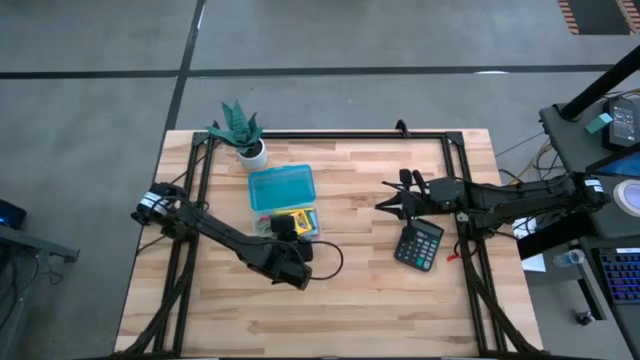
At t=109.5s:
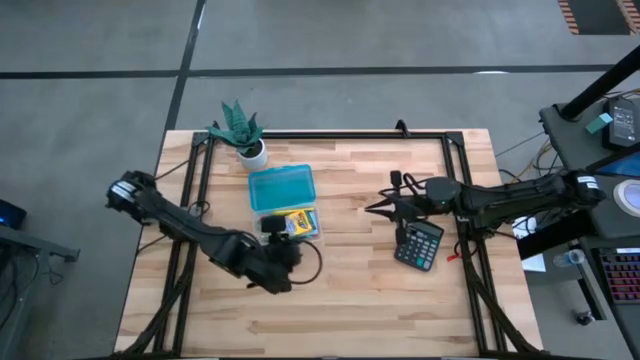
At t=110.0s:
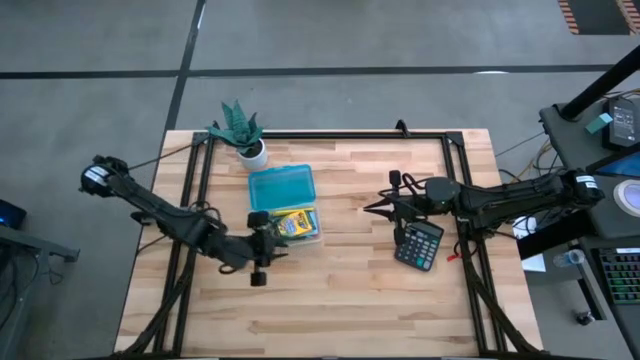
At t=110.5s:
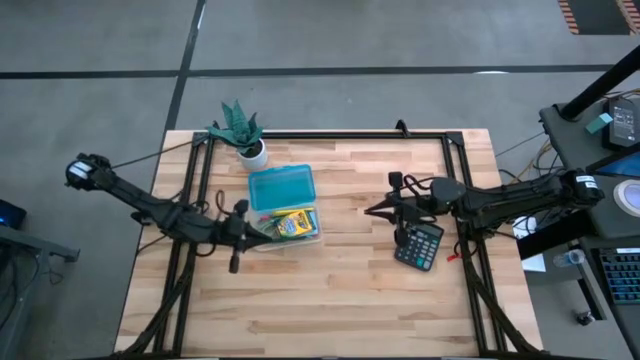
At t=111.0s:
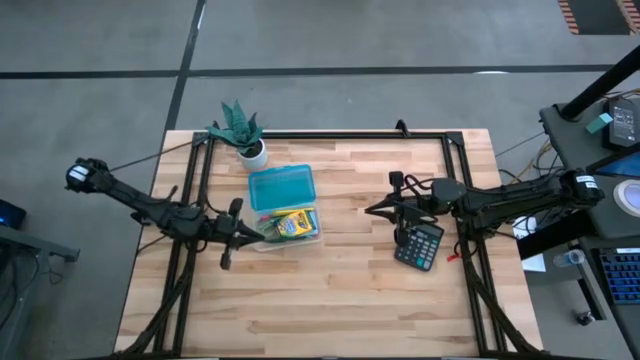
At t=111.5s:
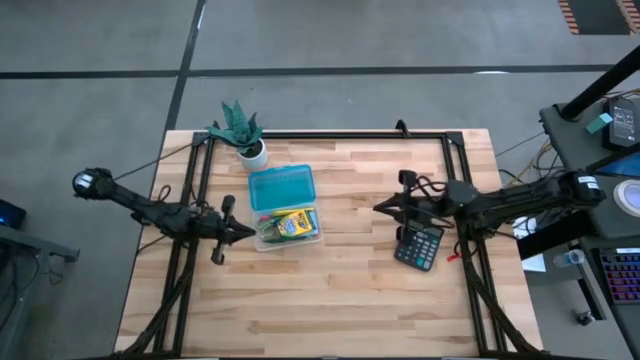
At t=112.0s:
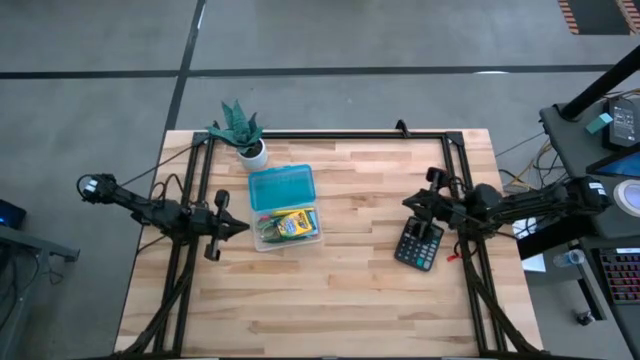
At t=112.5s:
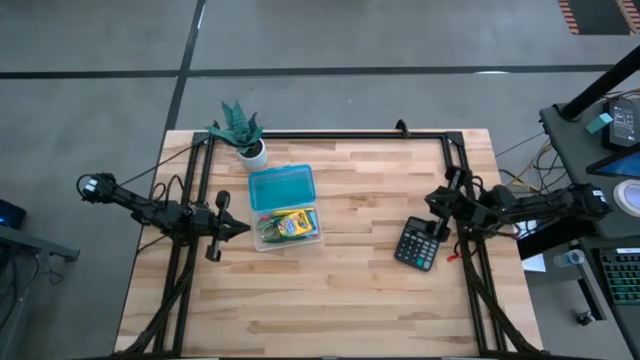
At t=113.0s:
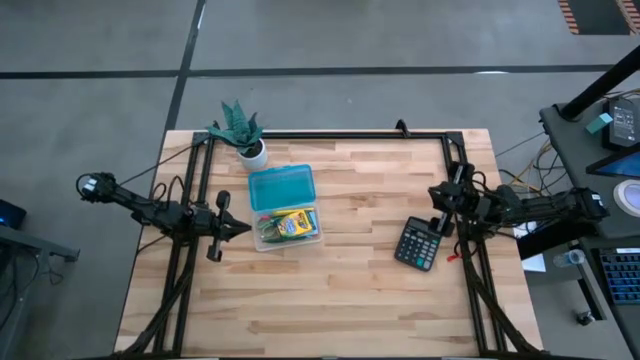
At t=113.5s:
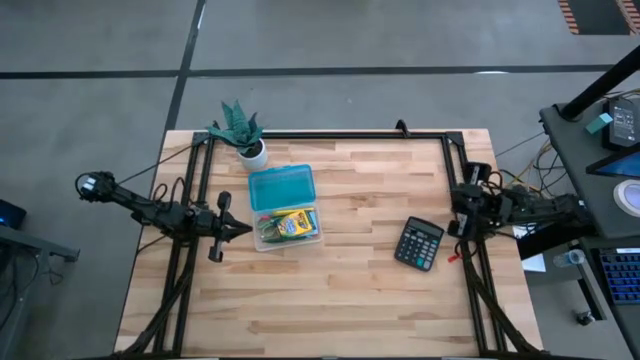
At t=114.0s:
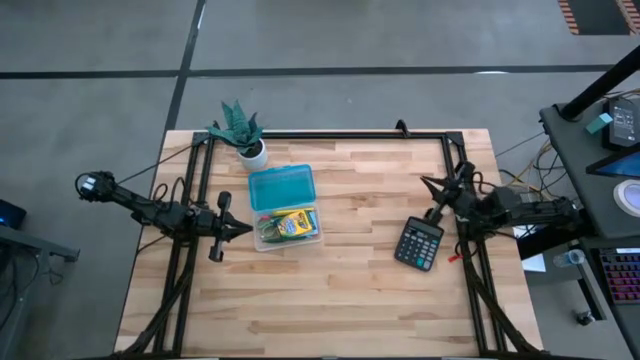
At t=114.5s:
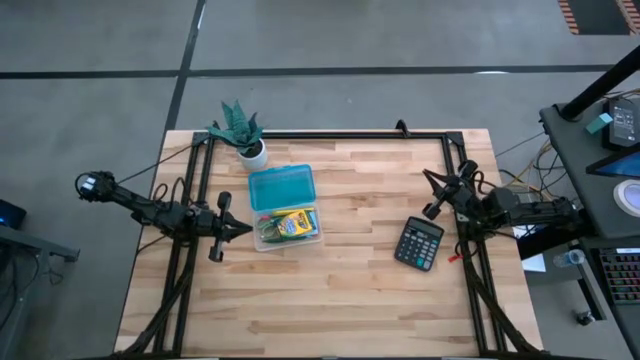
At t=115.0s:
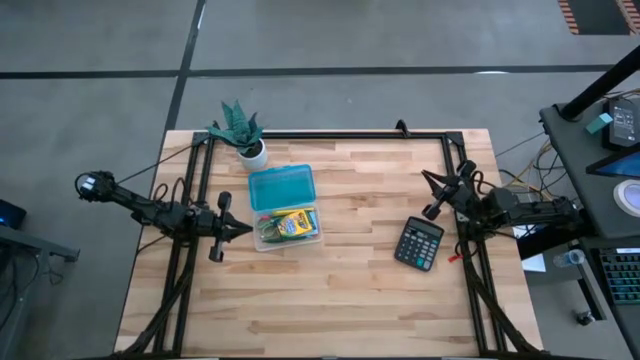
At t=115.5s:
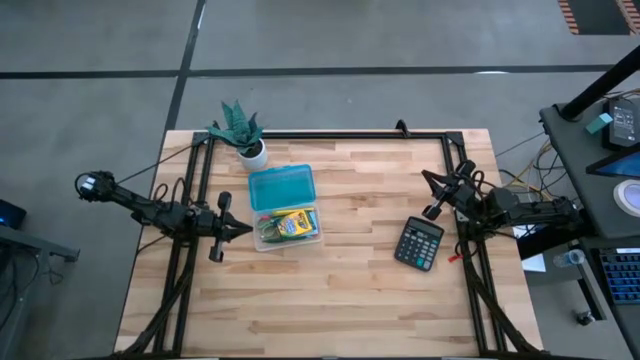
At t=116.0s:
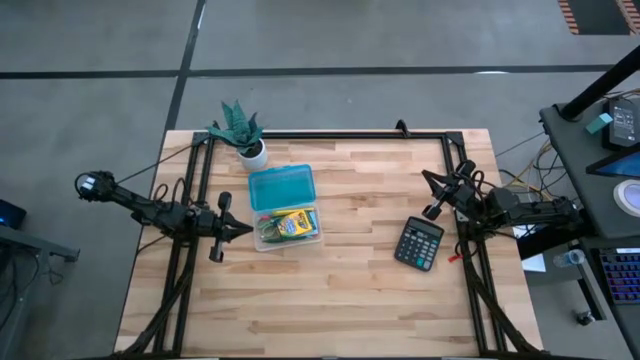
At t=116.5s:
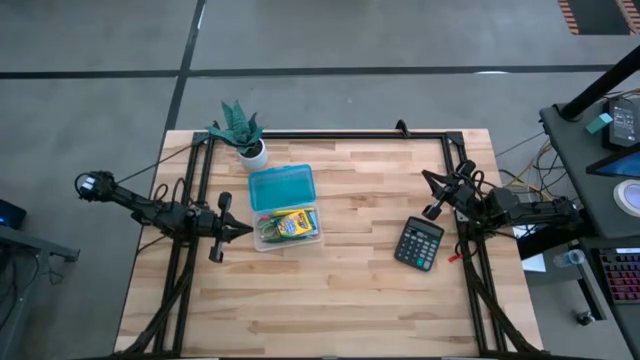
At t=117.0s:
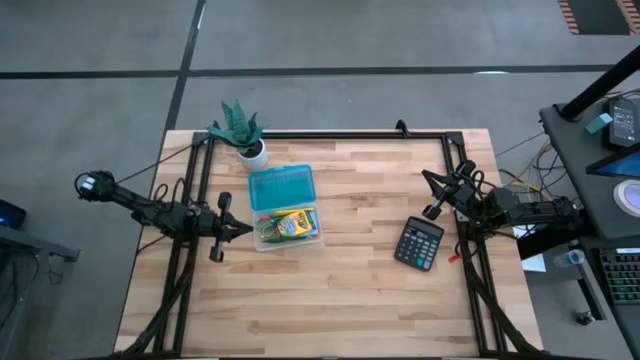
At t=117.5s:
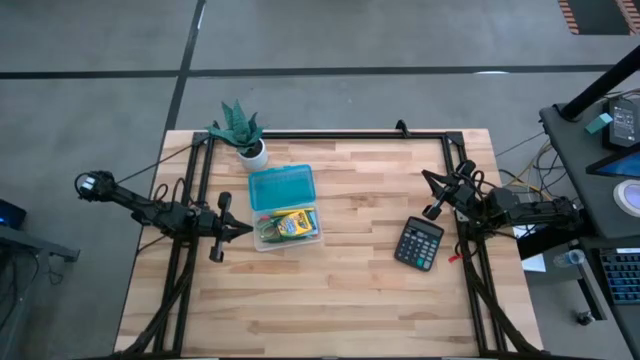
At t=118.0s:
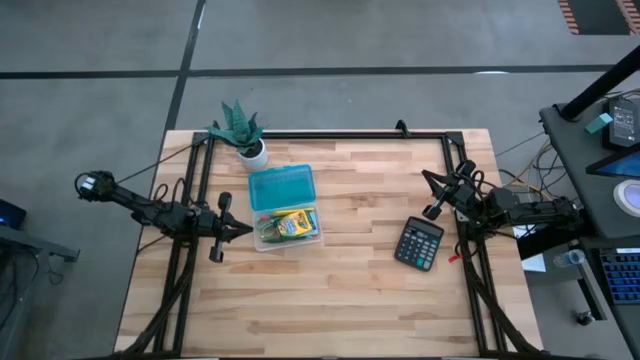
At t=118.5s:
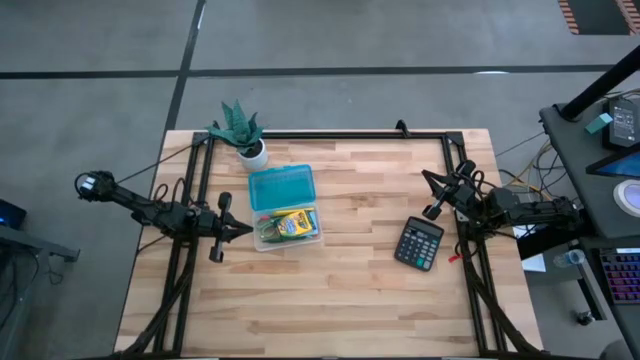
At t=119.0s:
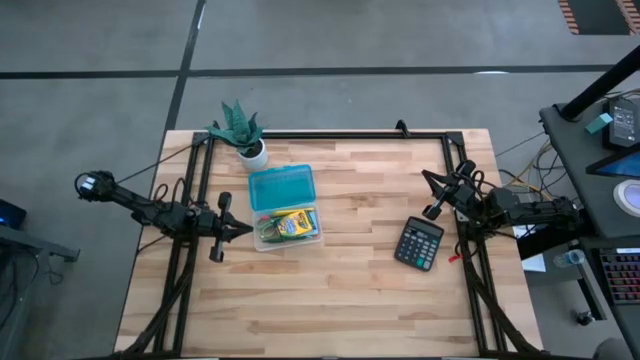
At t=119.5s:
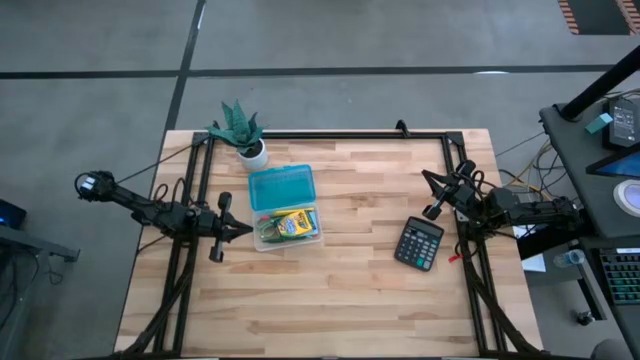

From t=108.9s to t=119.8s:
Task: Pack school essentials
Return to Home Position

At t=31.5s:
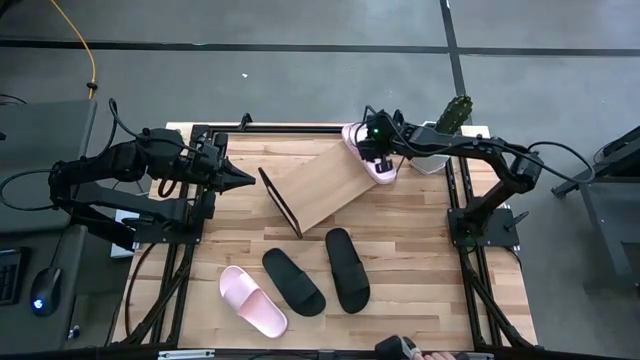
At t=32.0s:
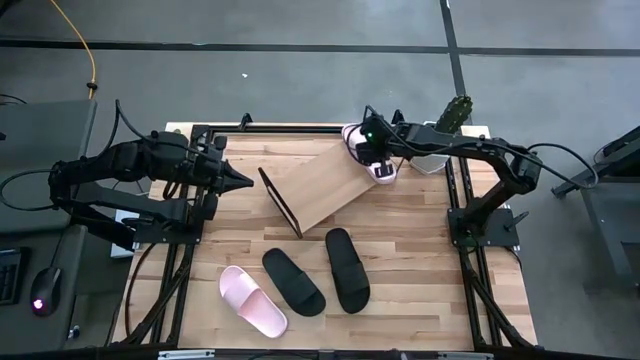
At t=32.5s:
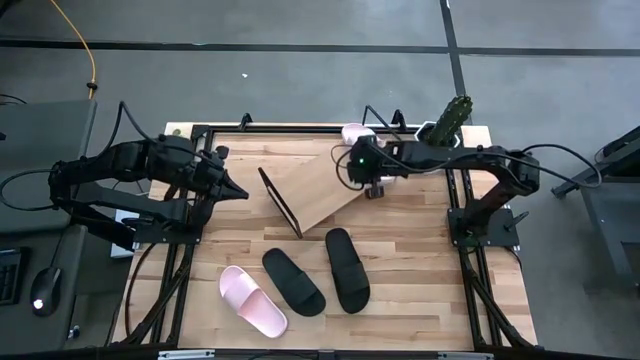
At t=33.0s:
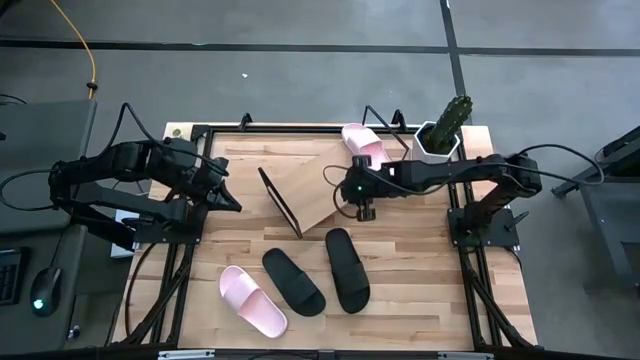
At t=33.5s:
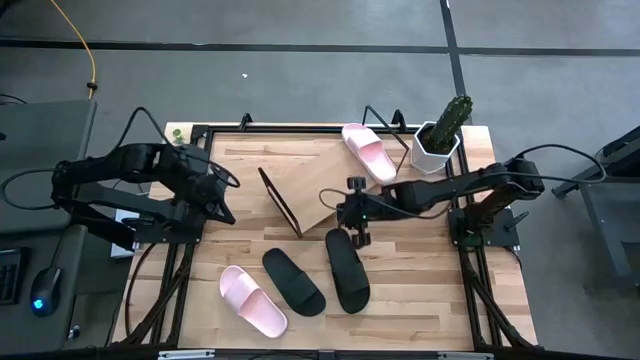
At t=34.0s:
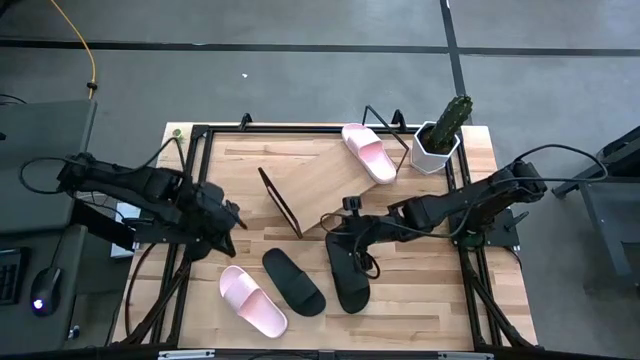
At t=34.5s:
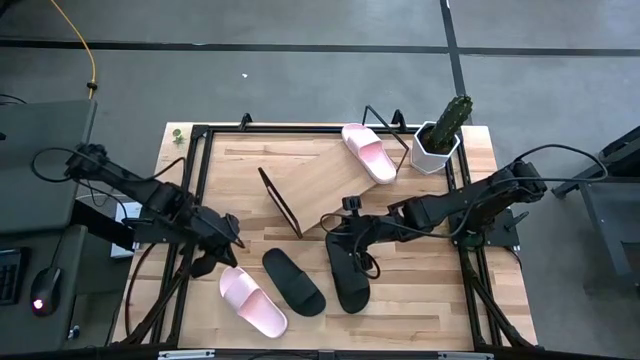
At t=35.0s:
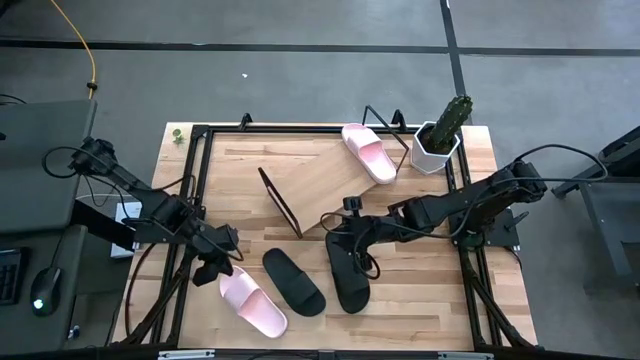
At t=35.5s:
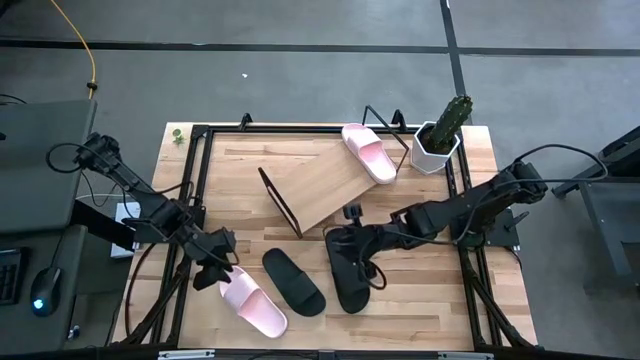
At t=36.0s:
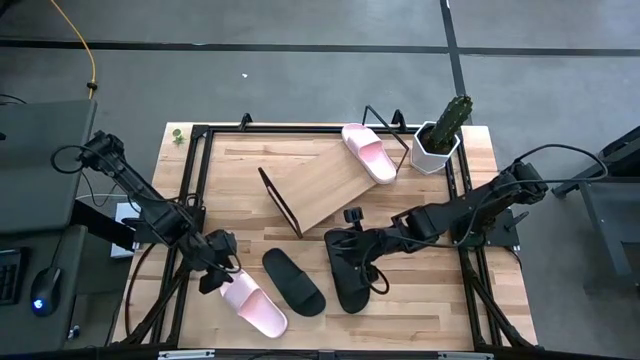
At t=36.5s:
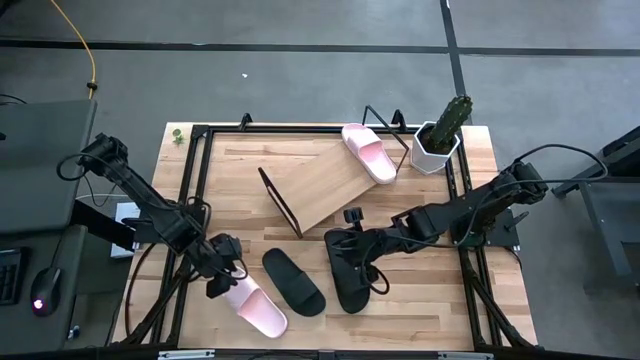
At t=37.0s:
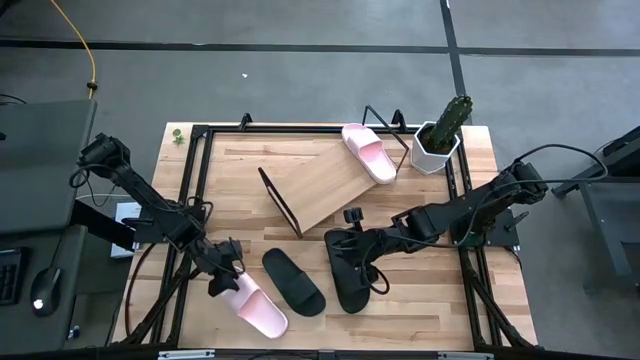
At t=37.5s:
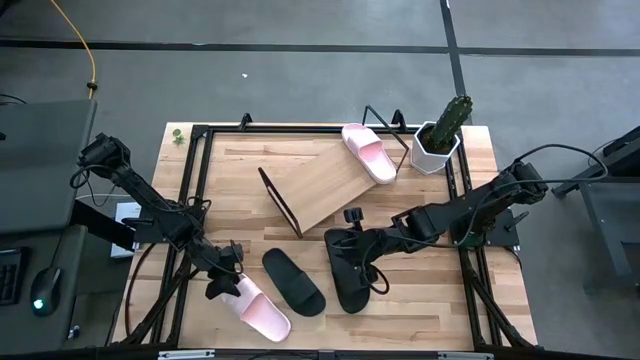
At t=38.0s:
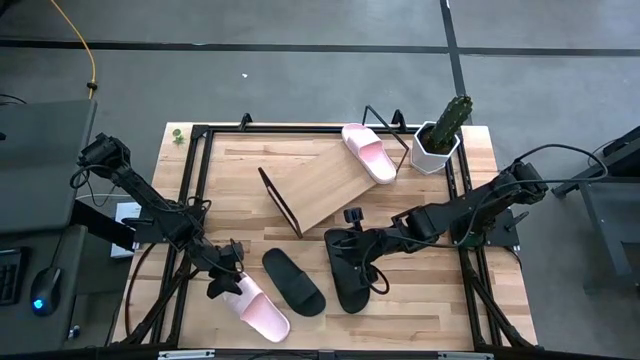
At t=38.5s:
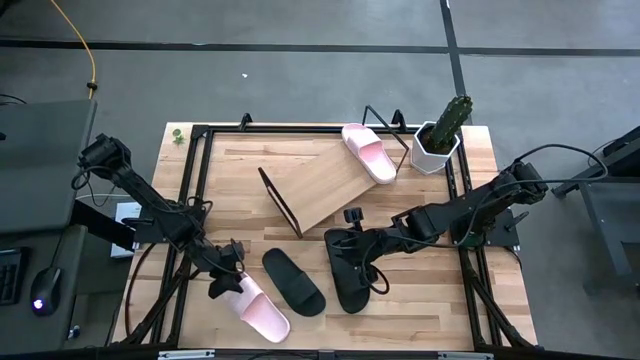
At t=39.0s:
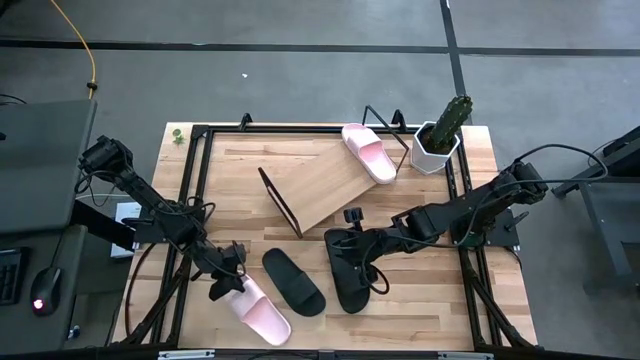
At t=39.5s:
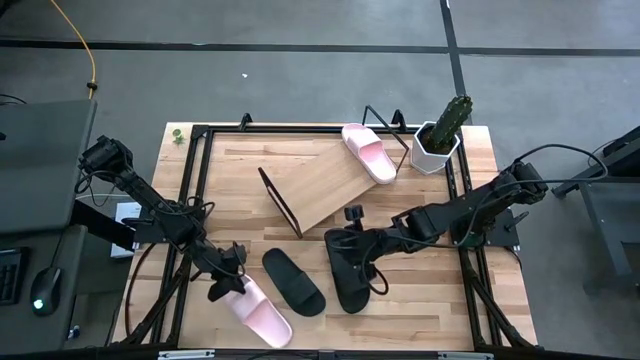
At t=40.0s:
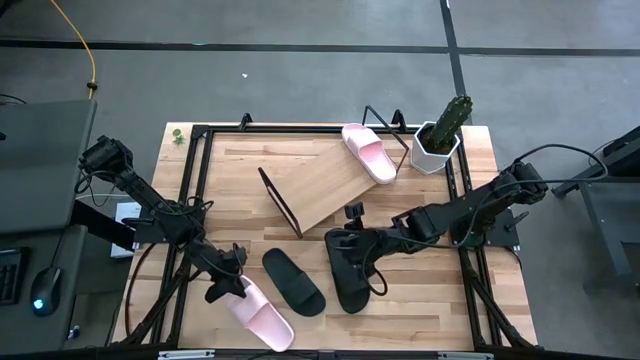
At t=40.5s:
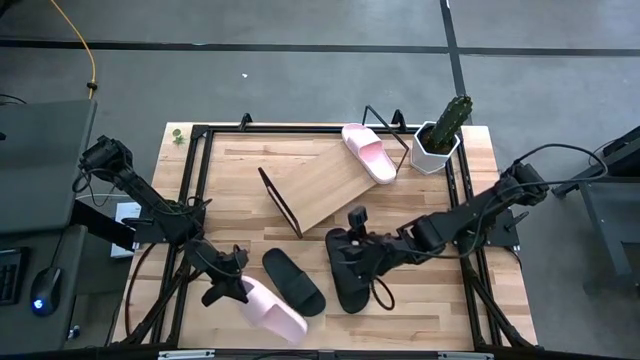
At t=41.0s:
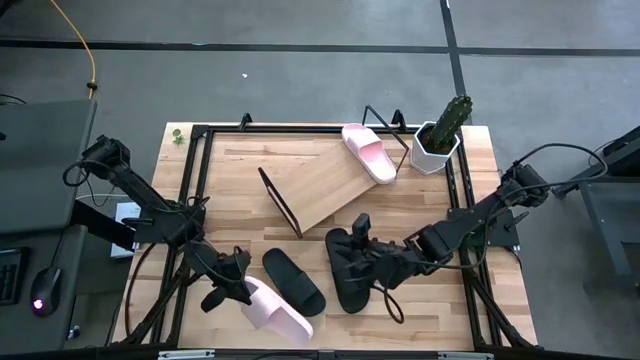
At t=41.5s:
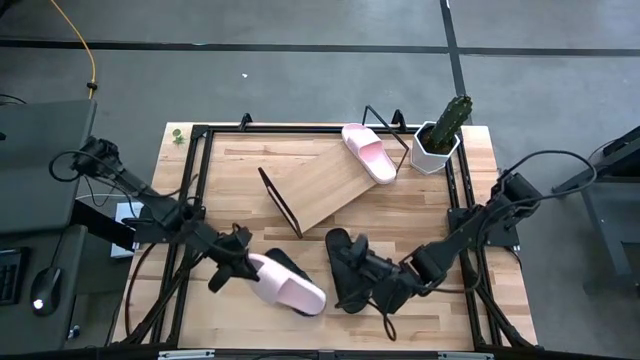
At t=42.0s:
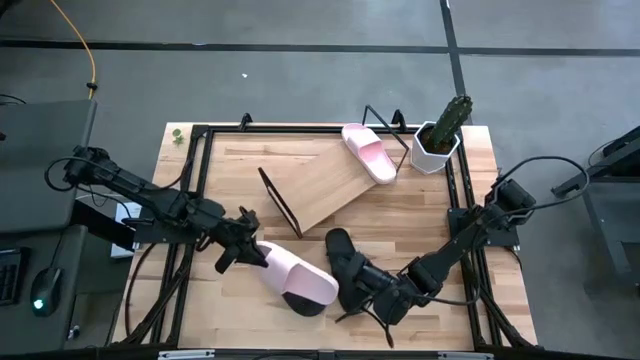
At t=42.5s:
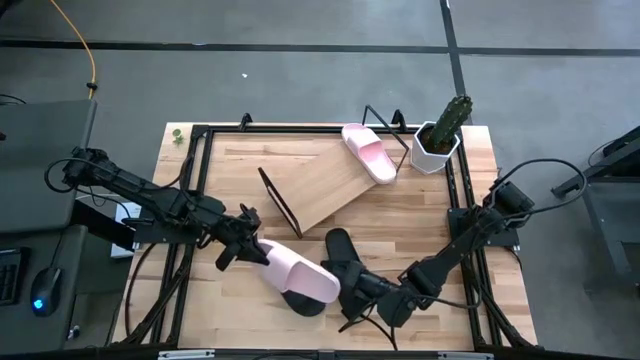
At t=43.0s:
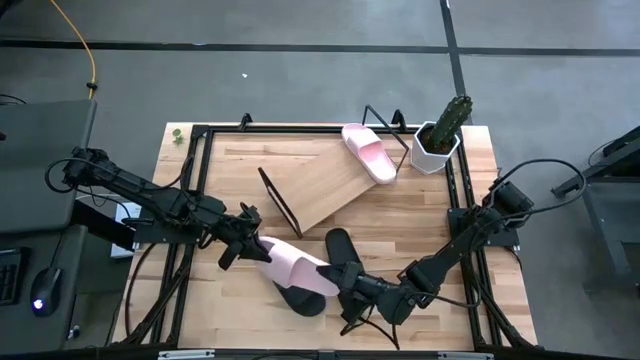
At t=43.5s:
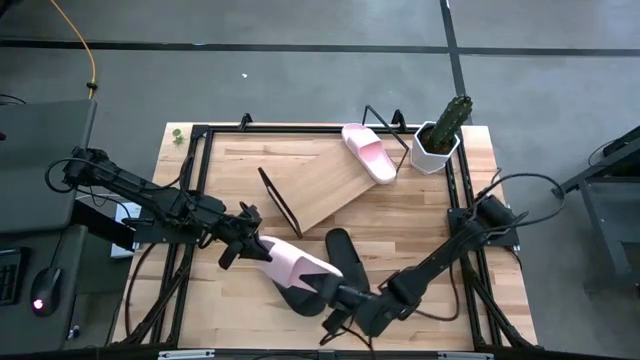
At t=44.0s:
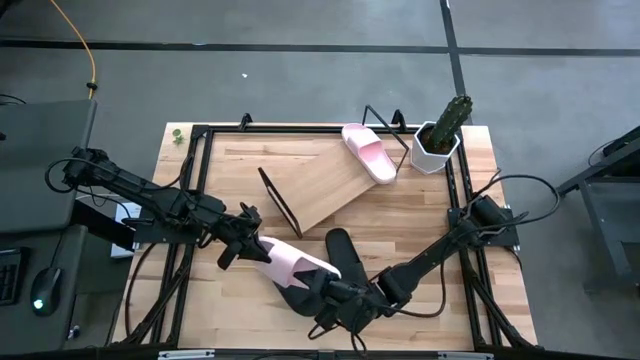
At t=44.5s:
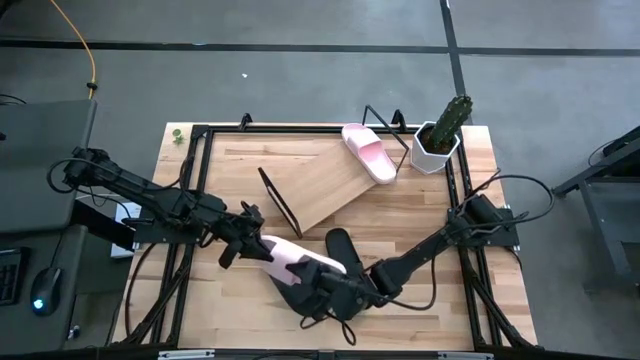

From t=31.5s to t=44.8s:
Task: Pick and place slides into the shelf
Put the pink slide on the shelf
